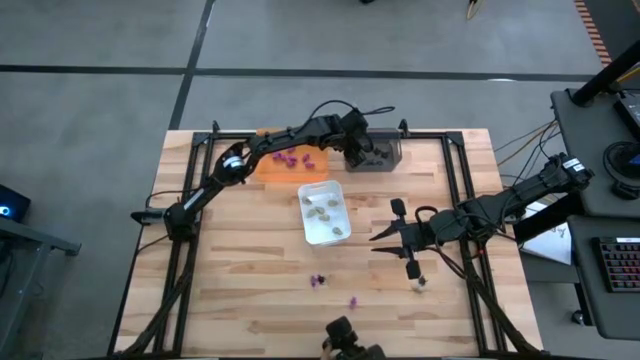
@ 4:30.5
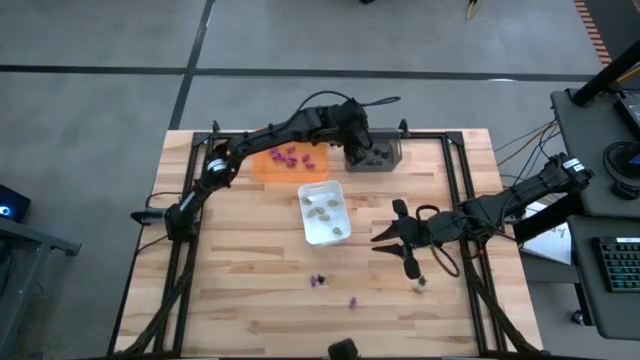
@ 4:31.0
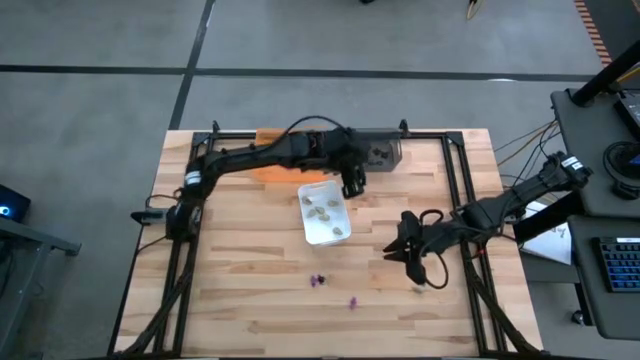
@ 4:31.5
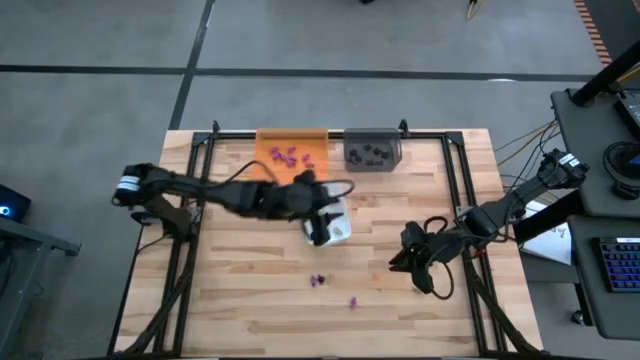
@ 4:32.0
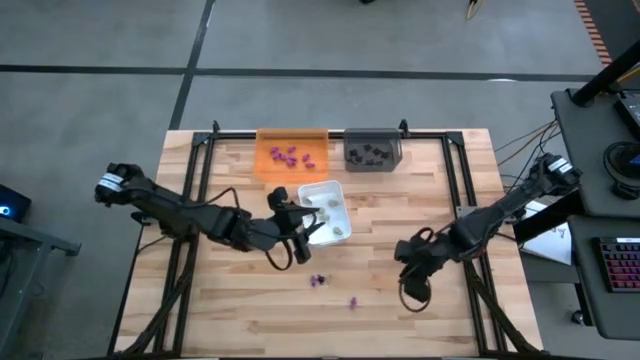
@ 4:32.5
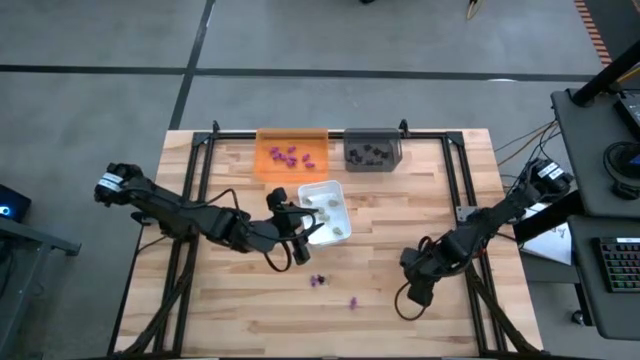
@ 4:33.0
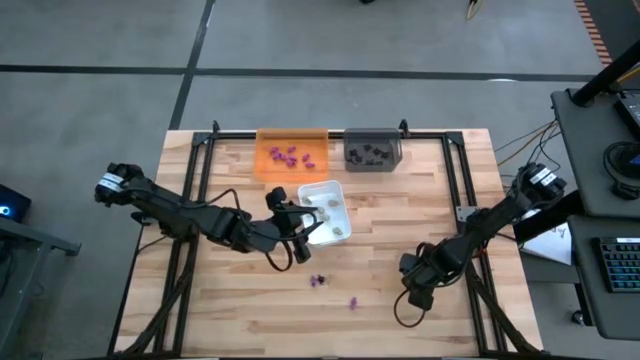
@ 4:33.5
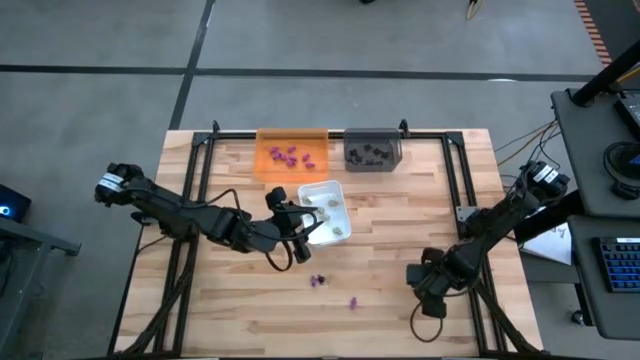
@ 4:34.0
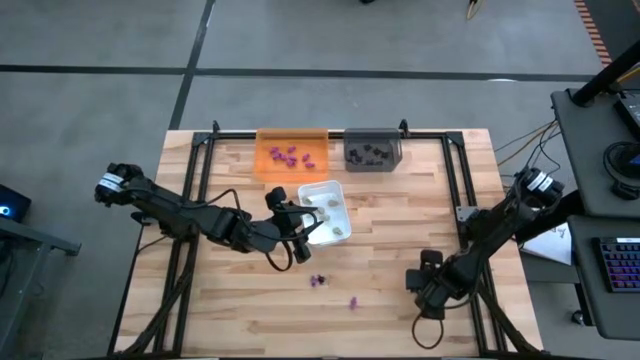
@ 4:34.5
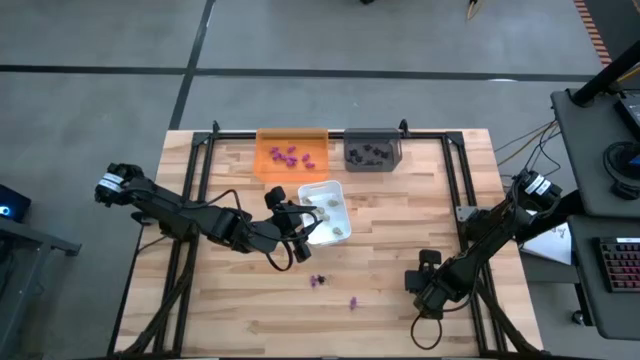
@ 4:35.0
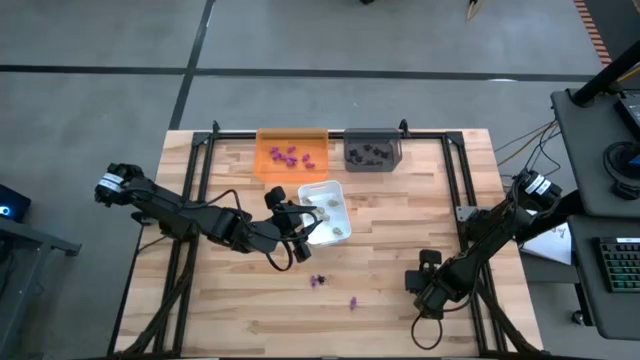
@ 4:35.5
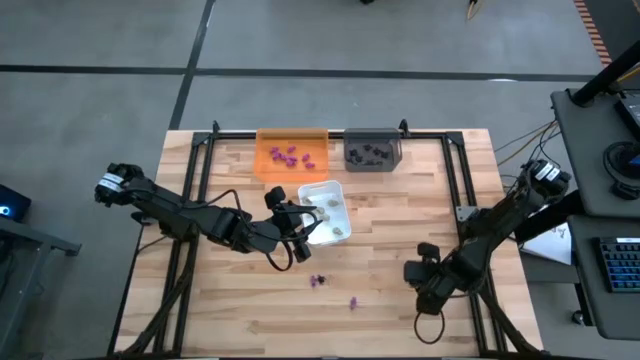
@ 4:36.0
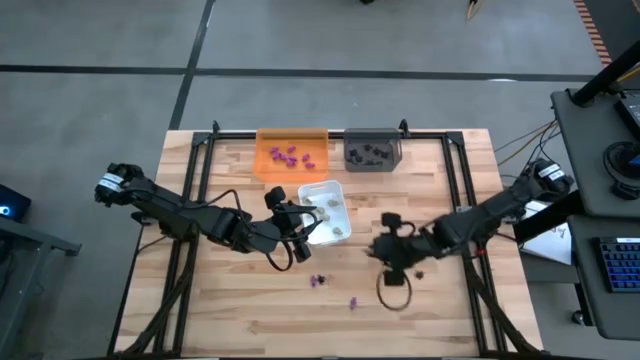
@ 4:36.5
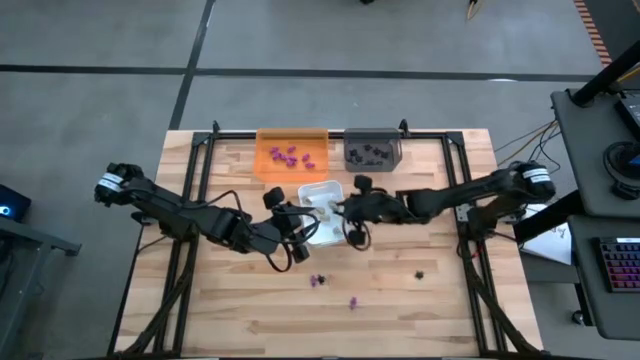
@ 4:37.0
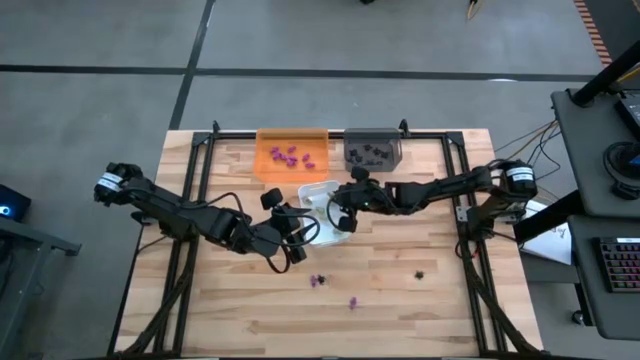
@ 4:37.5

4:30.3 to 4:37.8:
Task: Sort Halloween decoration
Put the white skull toy into the white bin

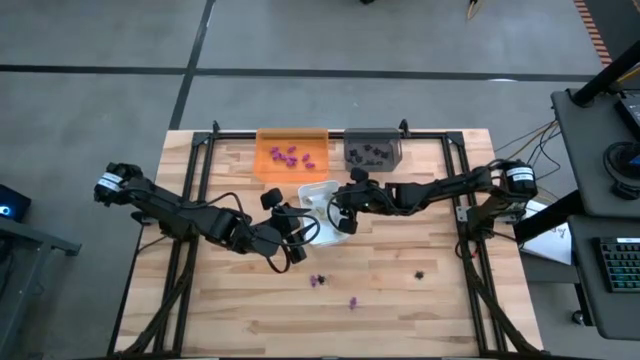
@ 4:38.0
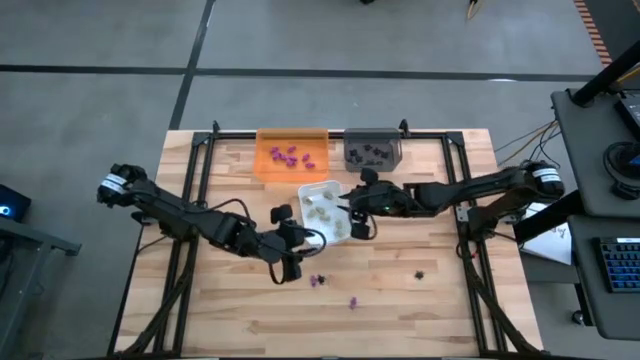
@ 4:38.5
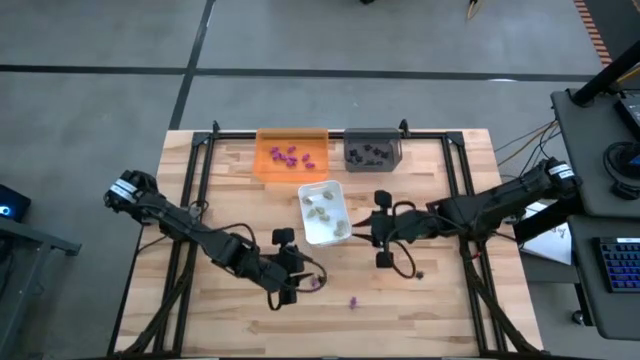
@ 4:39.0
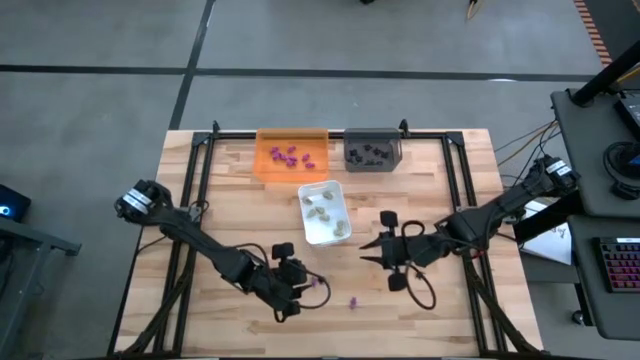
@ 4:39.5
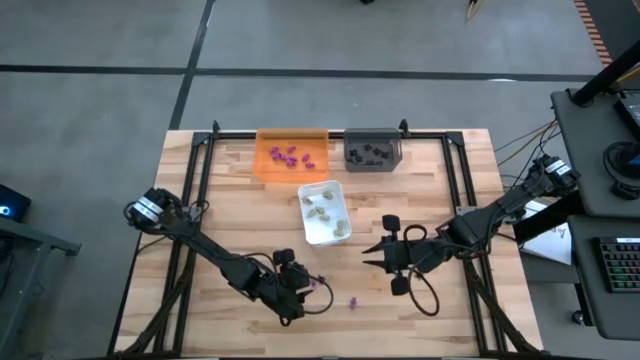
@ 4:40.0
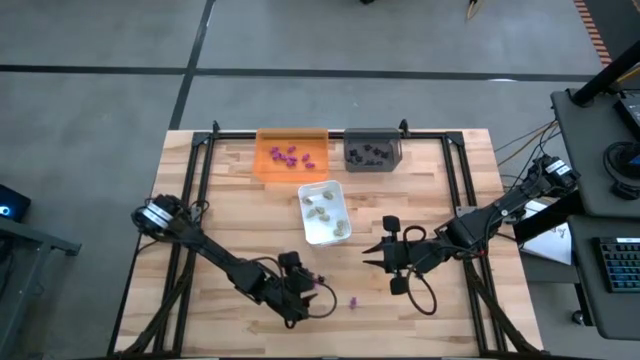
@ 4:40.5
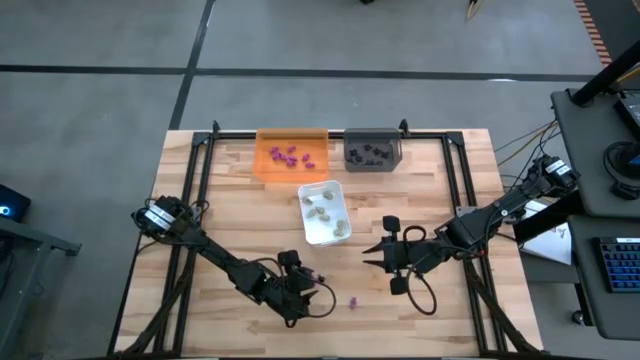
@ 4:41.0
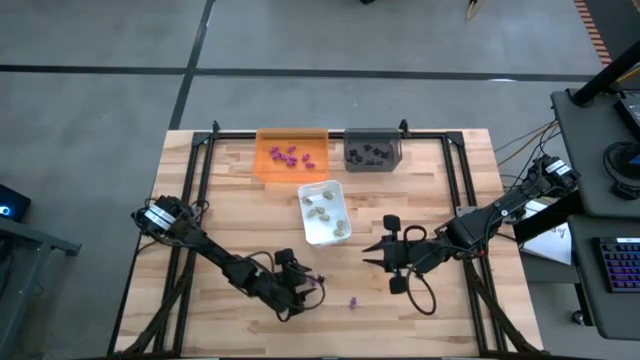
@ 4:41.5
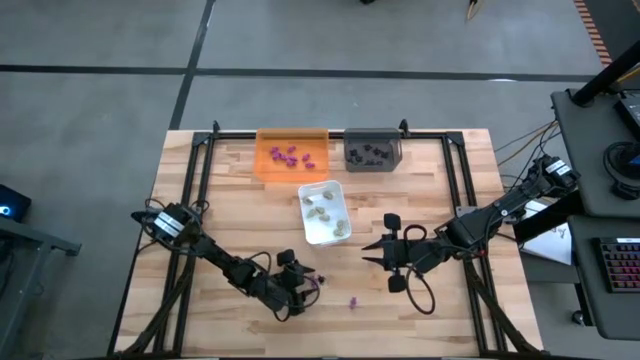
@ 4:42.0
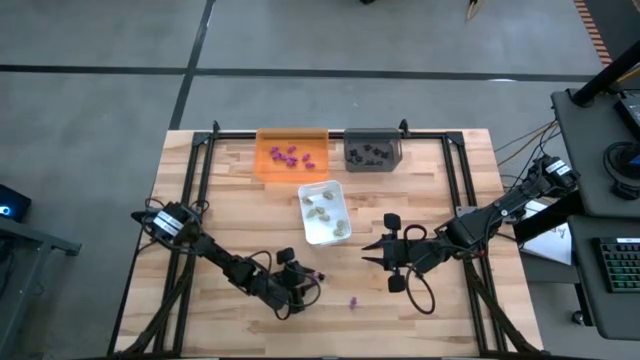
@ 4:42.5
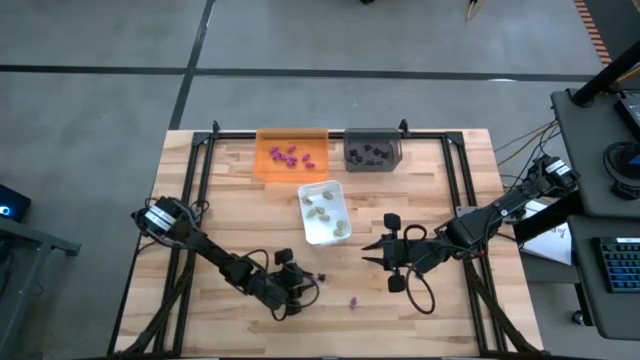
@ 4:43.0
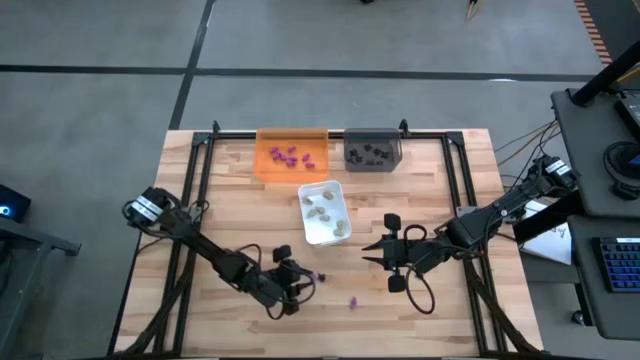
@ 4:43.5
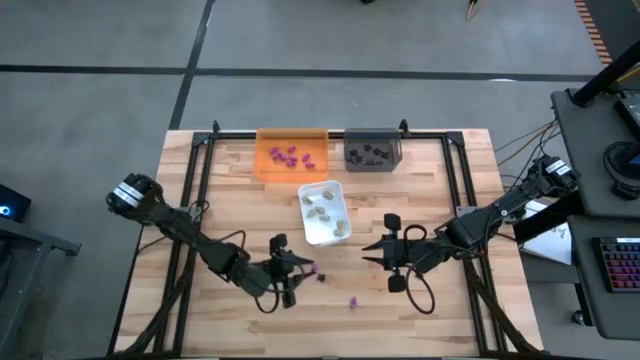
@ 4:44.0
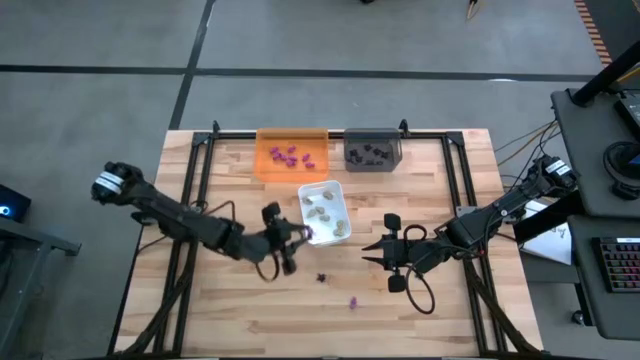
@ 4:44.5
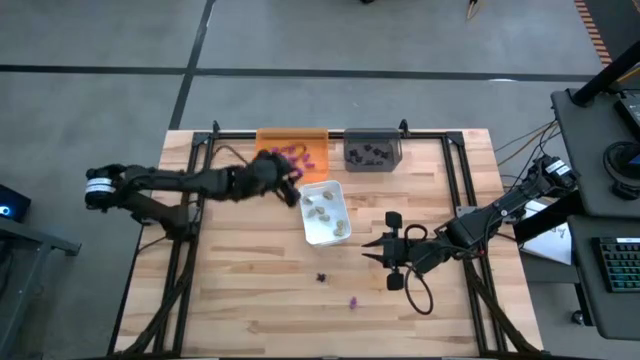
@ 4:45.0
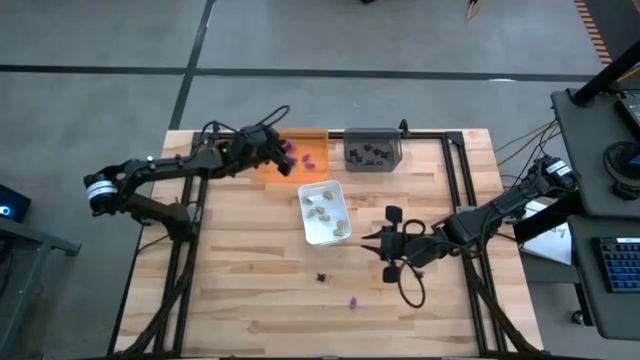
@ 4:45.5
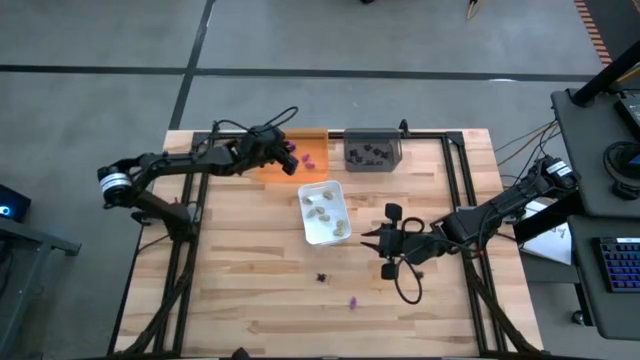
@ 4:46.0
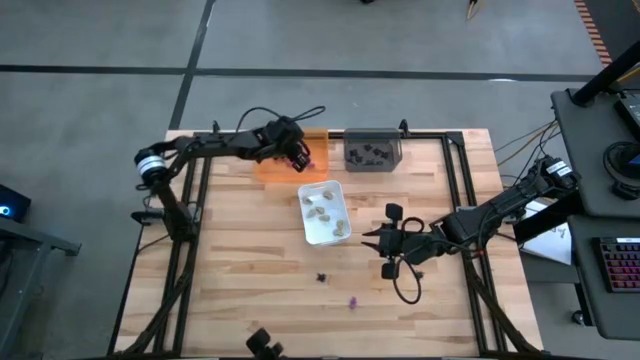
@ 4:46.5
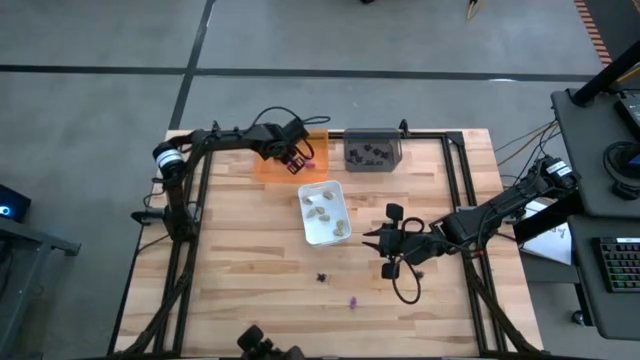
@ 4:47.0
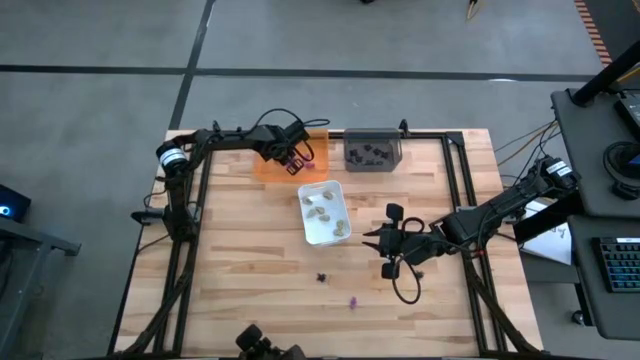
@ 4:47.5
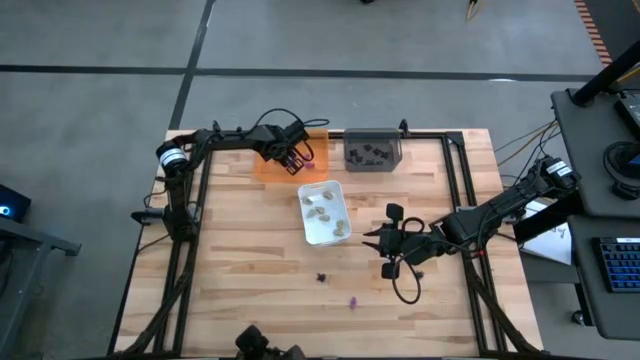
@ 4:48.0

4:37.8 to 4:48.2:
Put the purple skeleton toy into the orange bin

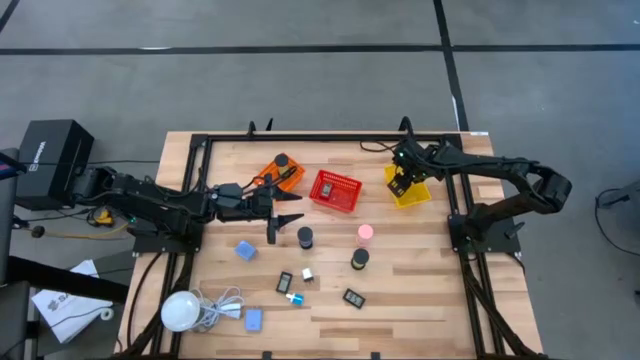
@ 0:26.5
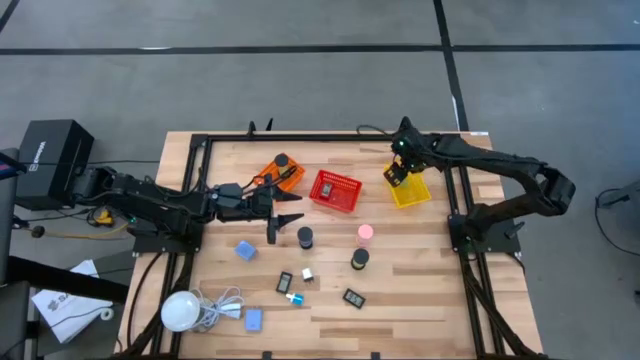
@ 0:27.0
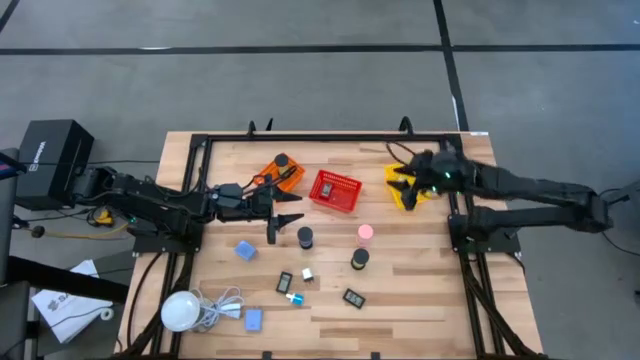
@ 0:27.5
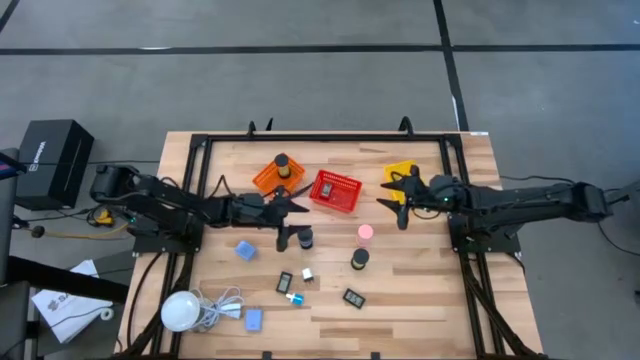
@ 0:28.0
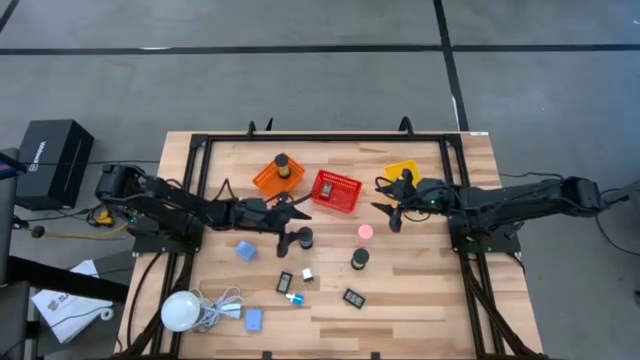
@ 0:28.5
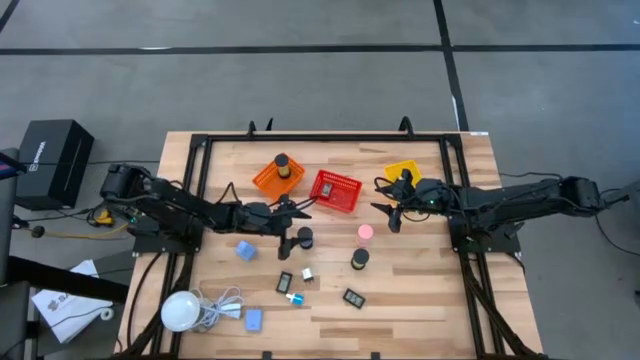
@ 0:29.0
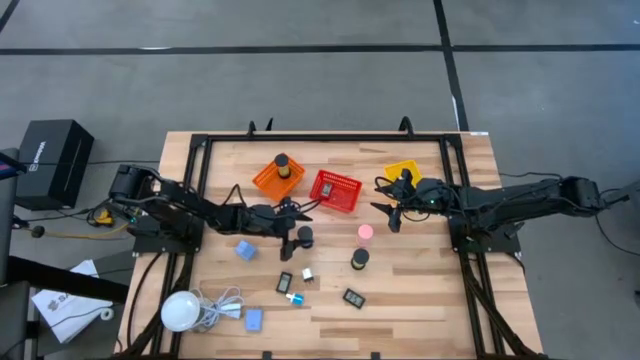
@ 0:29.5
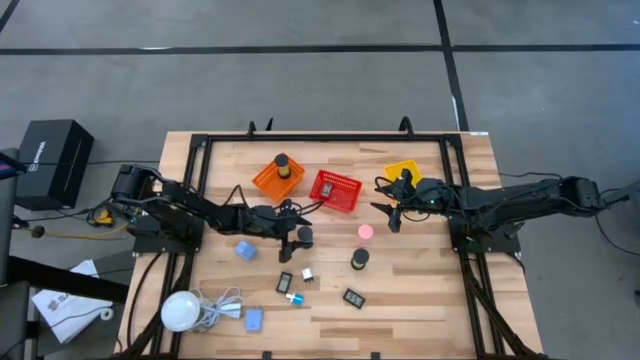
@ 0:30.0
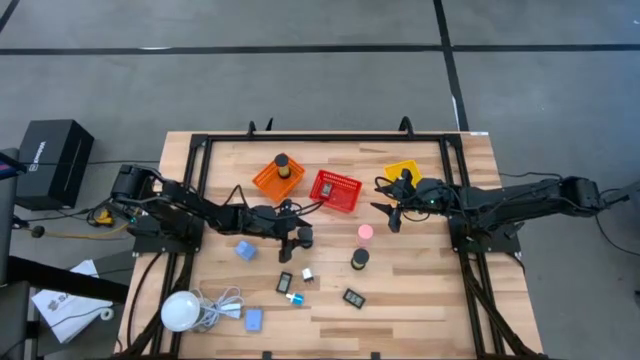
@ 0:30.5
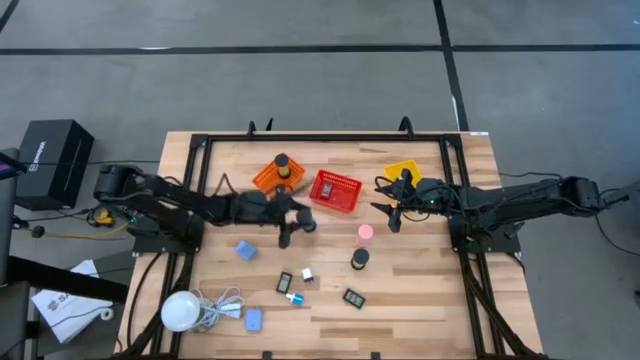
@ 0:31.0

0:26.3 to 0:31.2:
Task: Pick & Place Office items
Put the blue hourglass into the orange bin
